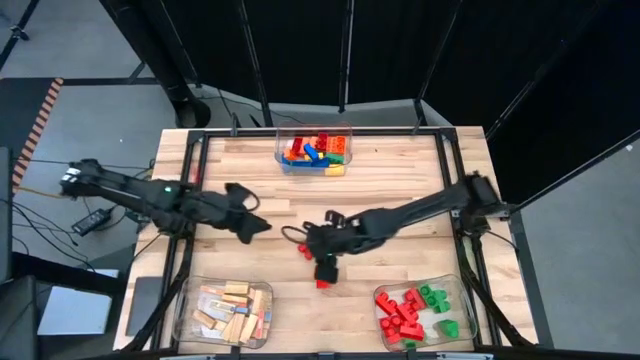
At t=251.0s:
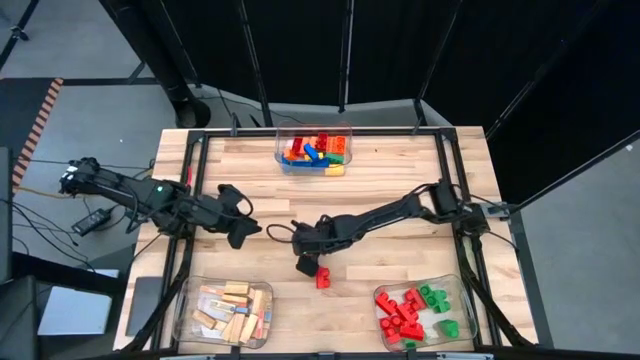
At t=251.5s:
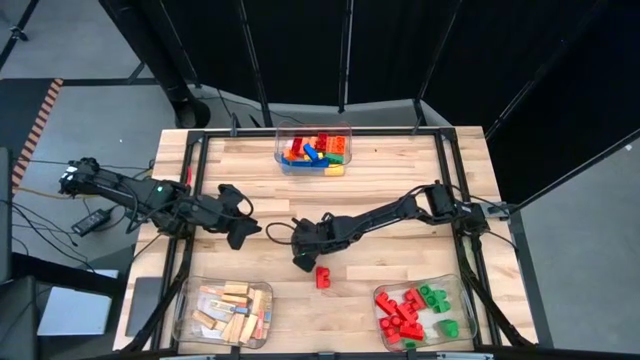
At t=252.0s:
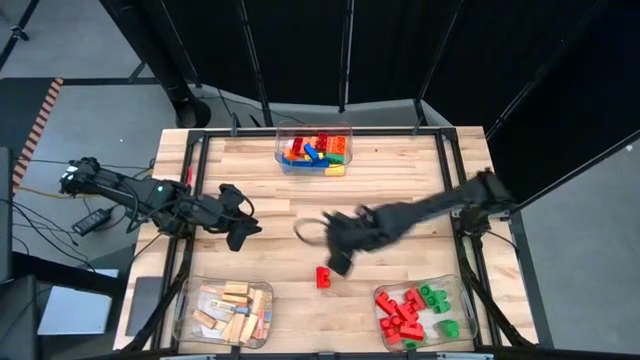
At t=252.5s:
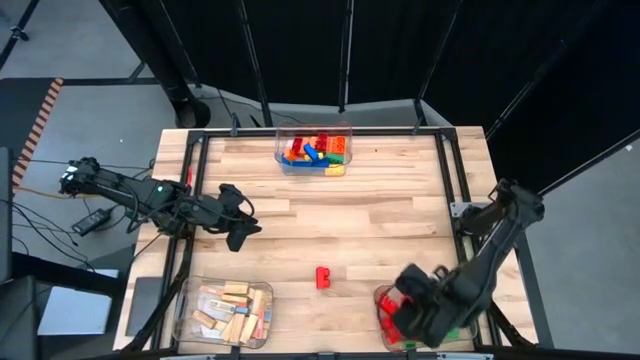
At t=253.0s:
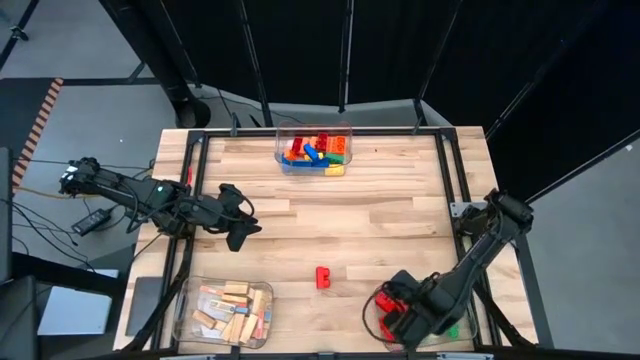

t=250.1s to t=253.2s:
Task: Sort blocks by size
Put the 2-stud red game piece into the bottom right transparent bin

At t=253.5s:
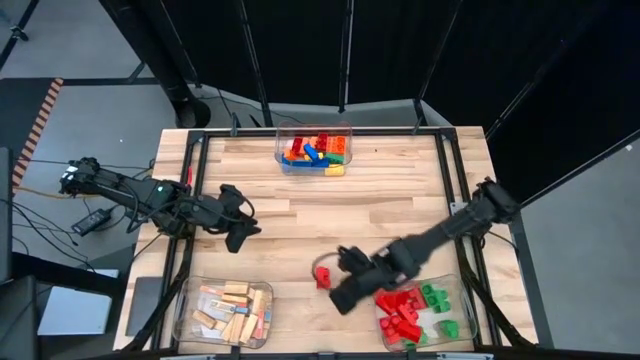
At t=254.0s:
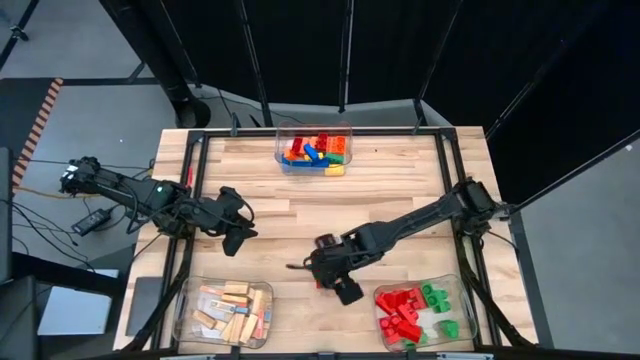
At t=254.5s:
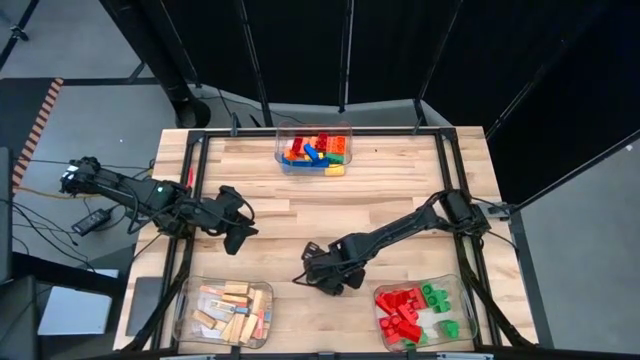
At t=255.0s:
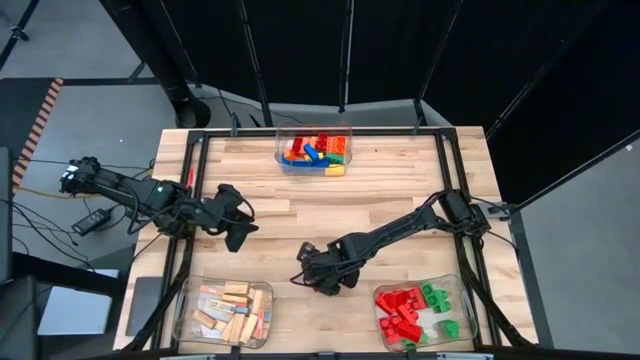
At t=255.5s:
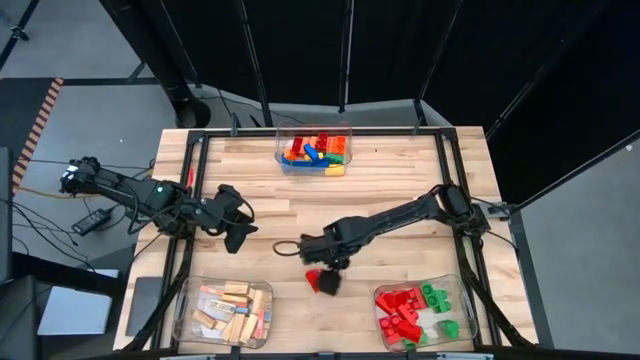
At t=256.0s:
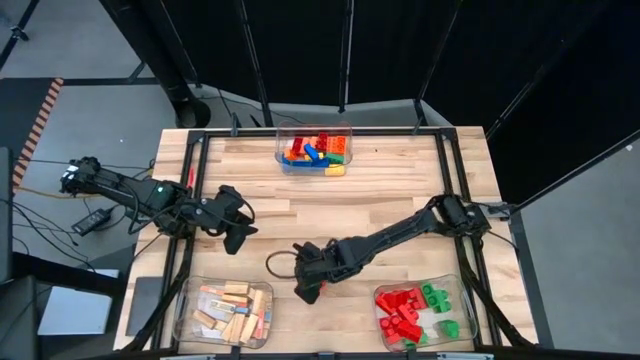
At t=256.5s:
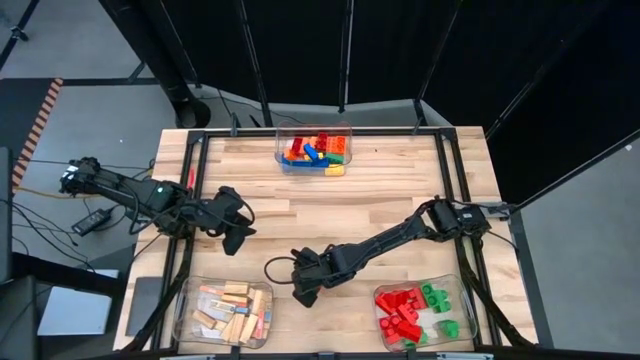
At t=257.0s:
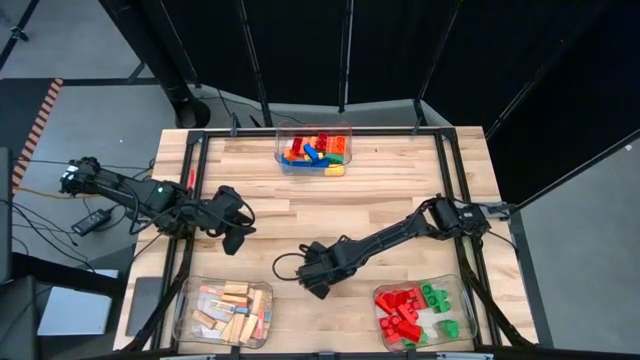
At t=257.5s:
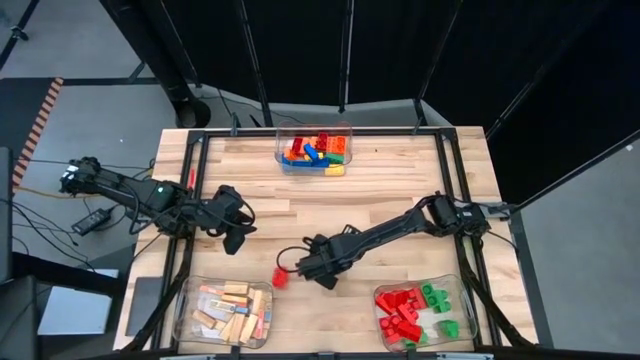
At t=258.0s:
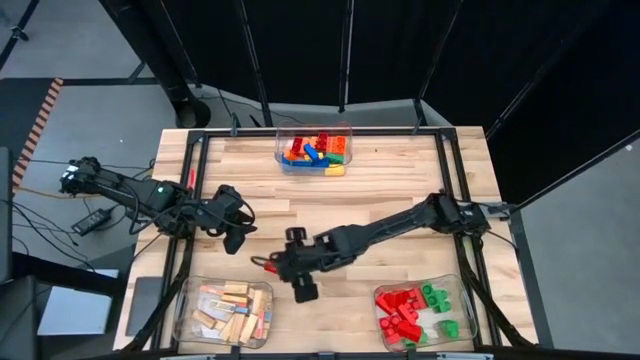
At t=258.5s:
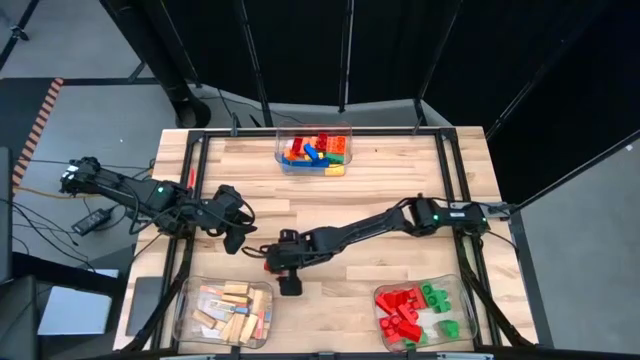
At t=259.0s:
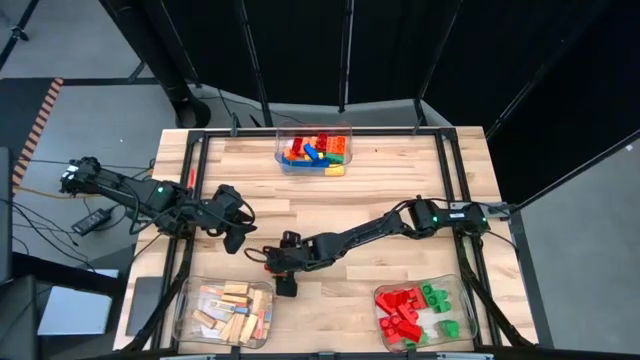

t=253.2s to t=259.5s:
Put the 2-stud red game piece into the bottom right transparent bin

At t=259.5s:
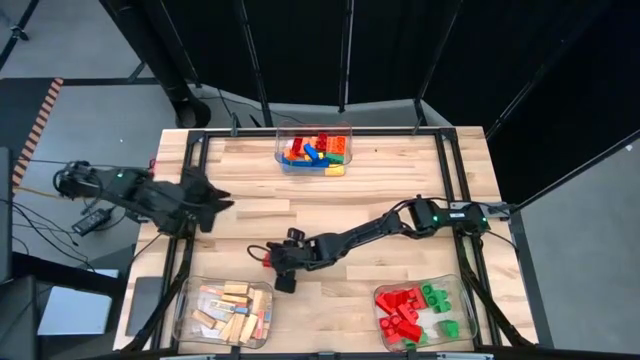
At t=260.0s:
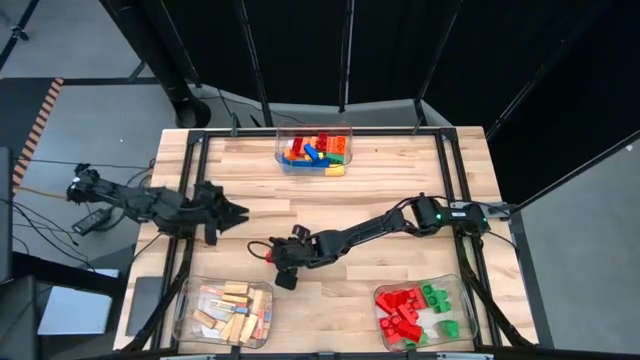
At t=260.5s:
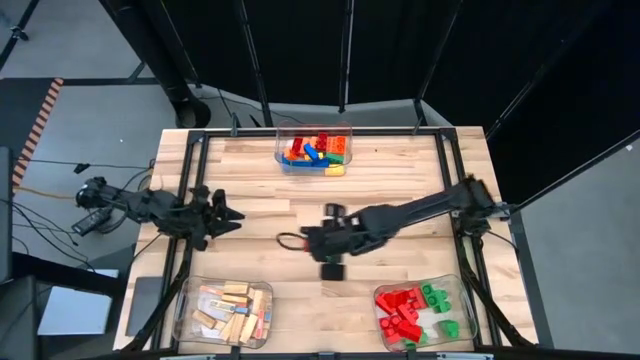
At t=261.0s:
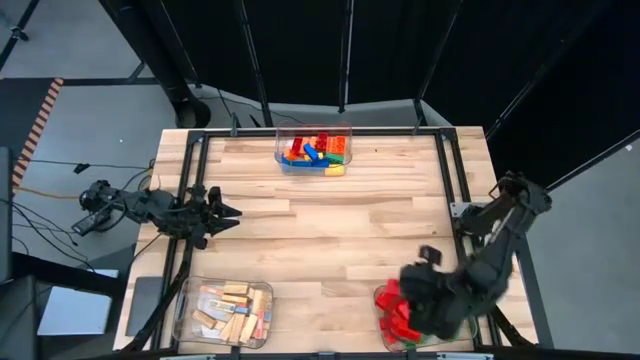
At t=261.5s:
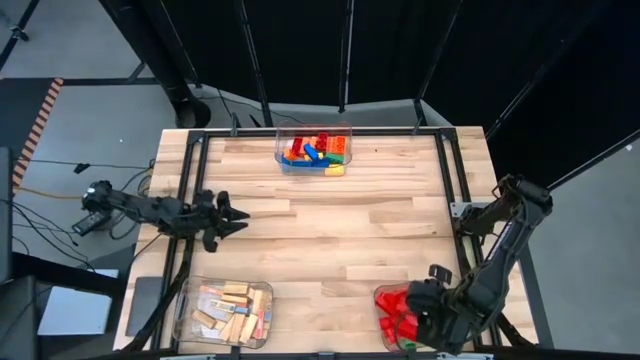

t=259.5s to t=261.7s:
Put the 2-stud red game piece into the bottom right transparent bin

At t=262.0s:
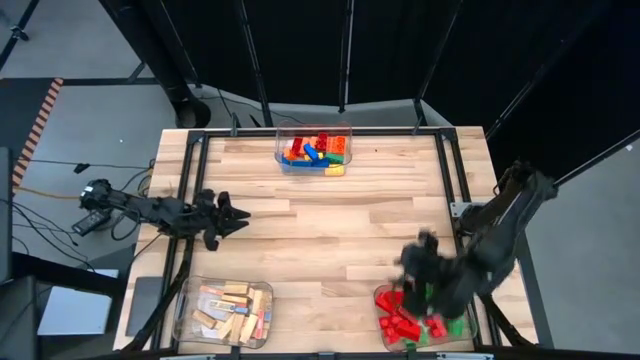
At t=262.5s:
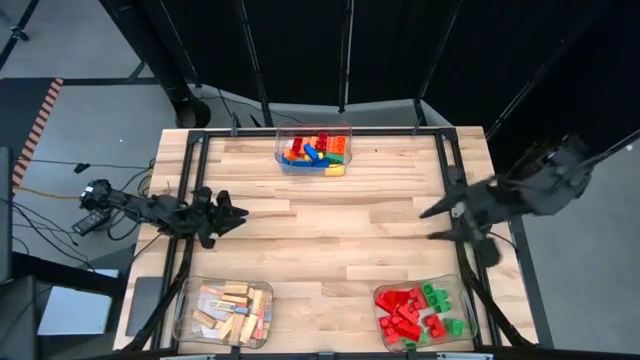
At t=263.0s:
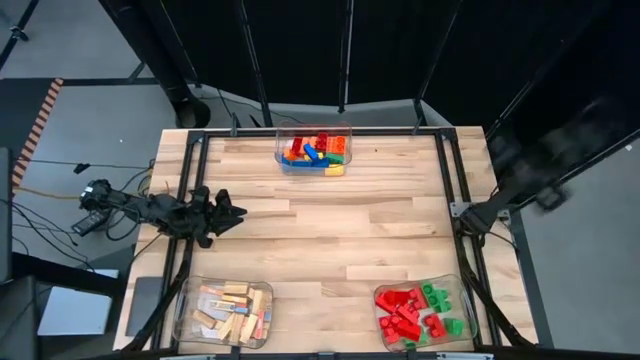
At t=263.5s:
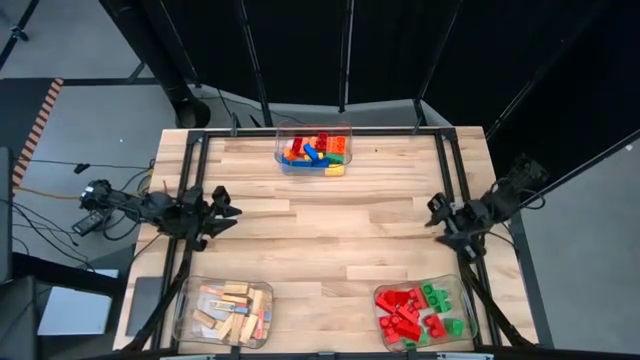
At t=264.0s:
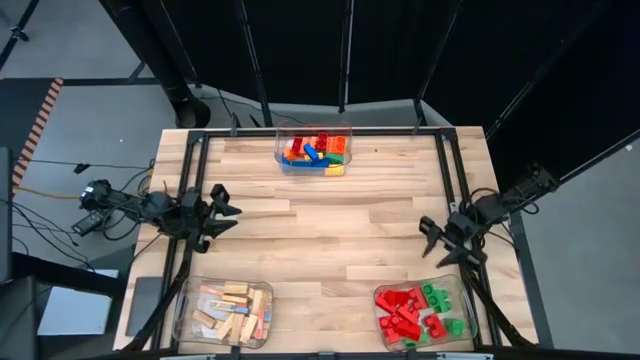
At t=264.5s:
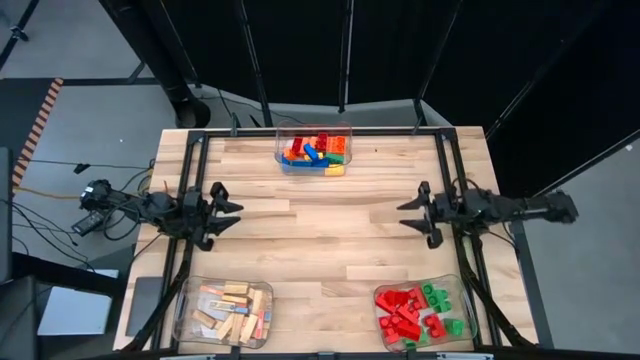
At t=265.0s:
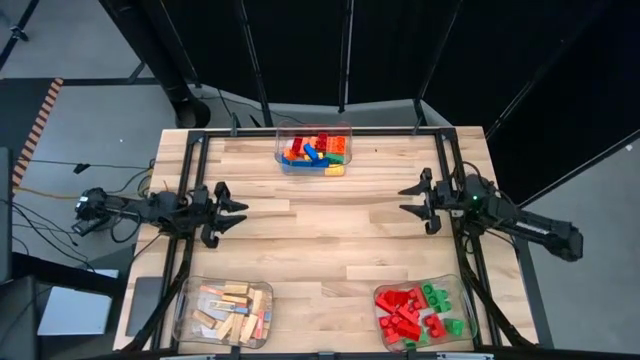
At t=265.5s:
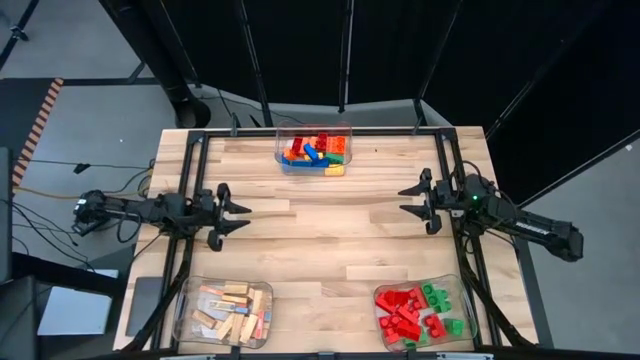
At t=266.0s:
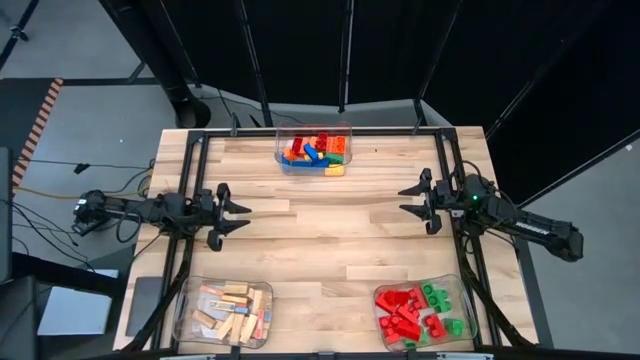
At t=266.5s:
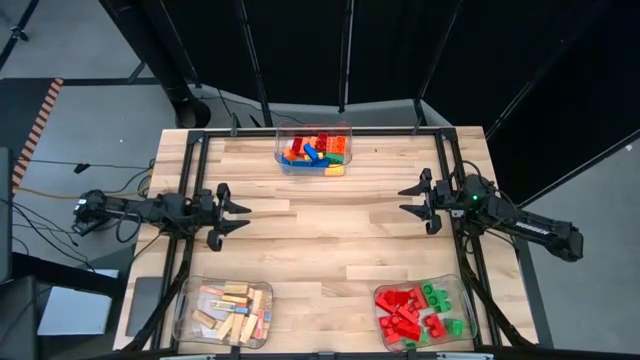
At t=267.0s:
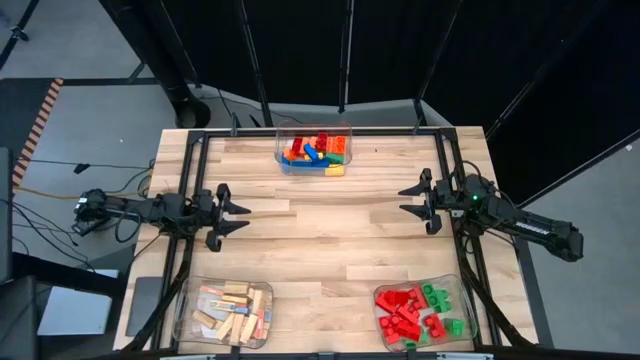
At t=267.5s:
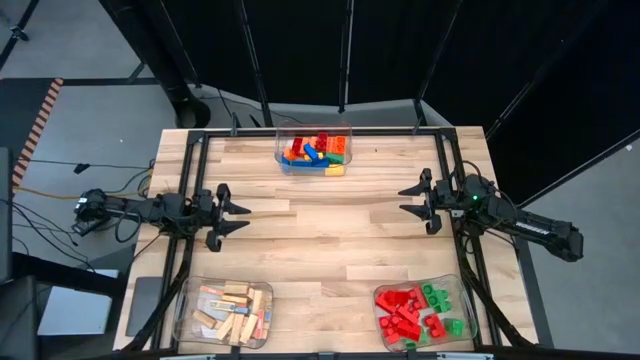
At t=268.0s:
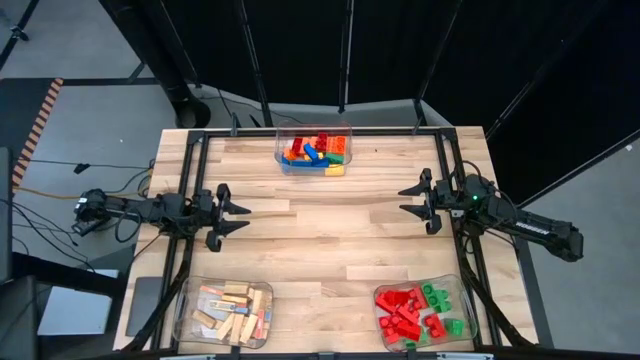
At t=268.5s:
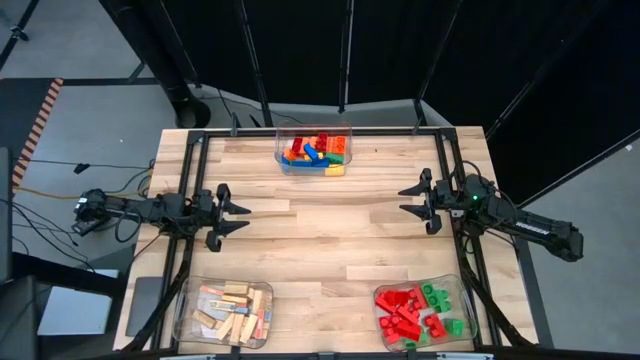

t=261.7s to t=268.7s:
Return to Home Position

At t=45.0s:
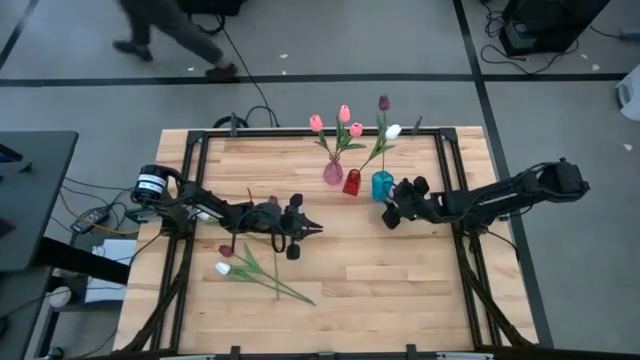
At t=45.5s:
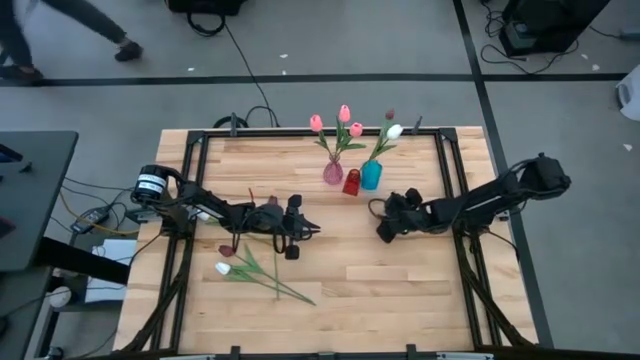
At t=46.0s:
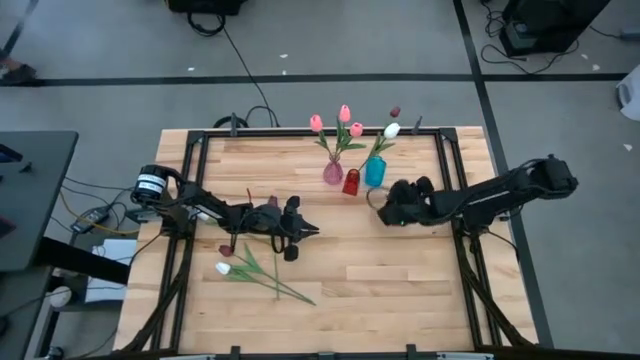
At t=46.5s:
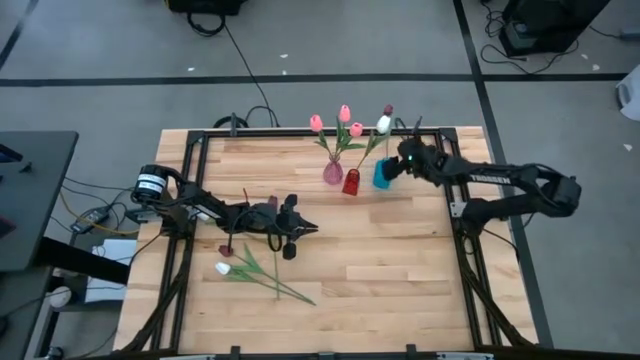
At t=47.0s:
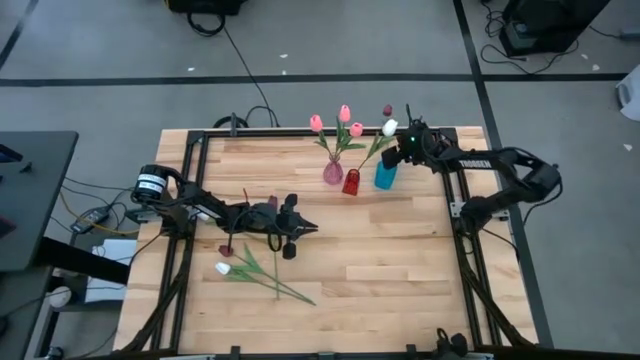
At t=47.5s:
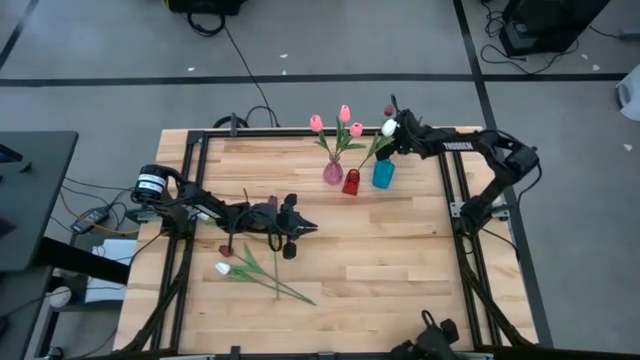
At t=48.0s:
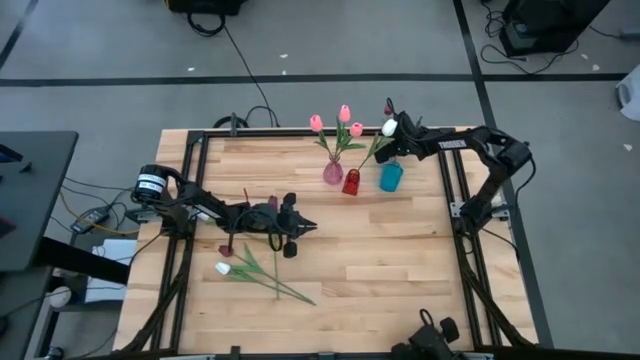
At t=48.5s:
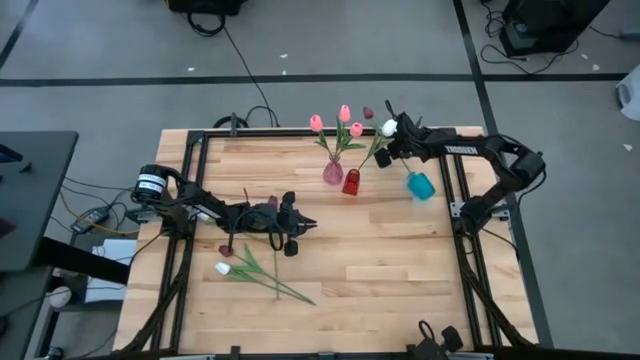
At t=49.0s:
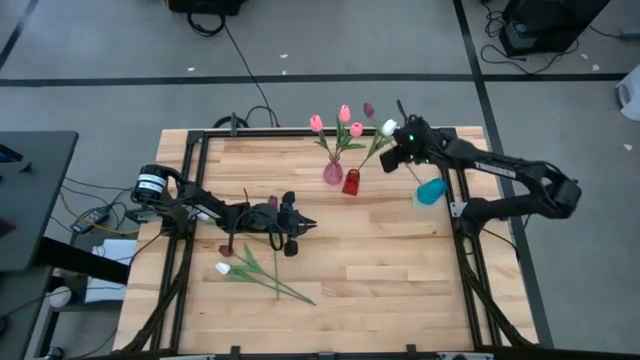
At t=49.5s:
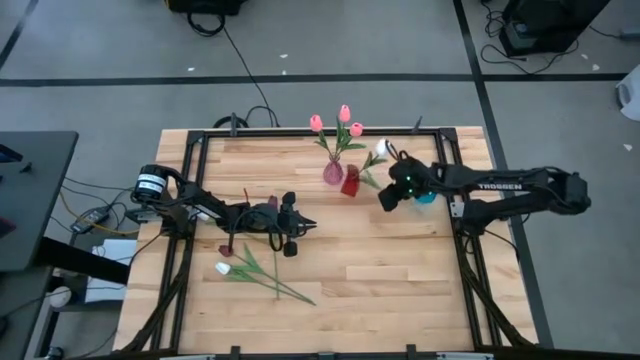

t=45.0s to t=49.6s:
Task: Sort flowers into vase by color
Remove the red flower from the blue vase
